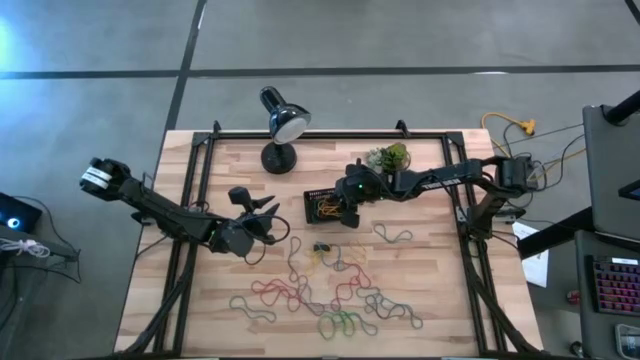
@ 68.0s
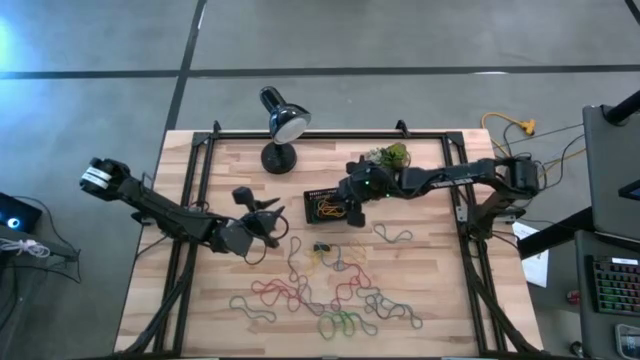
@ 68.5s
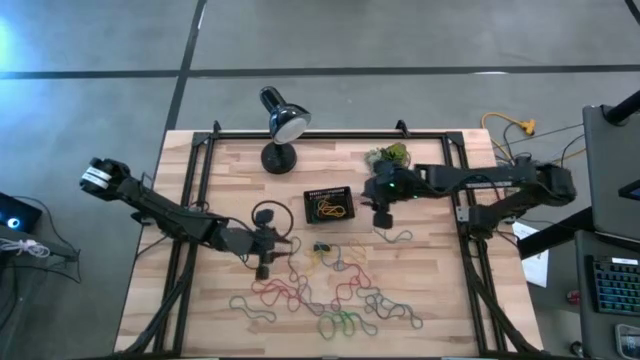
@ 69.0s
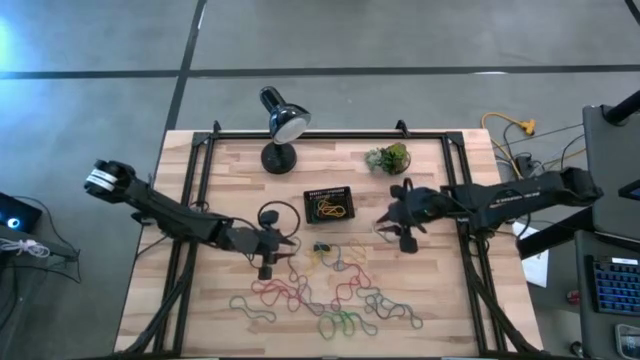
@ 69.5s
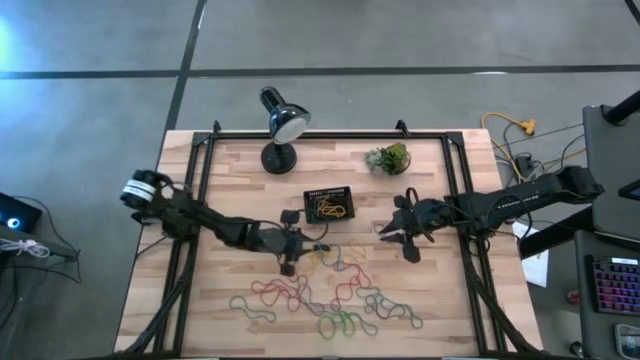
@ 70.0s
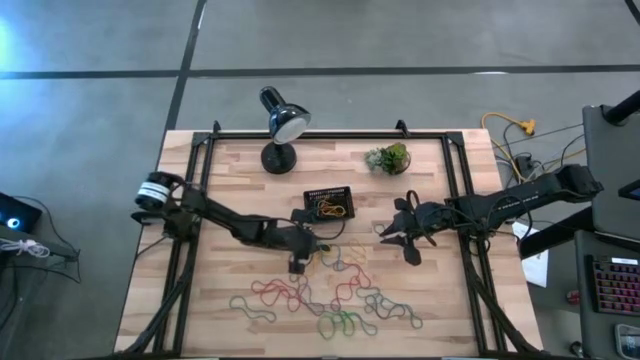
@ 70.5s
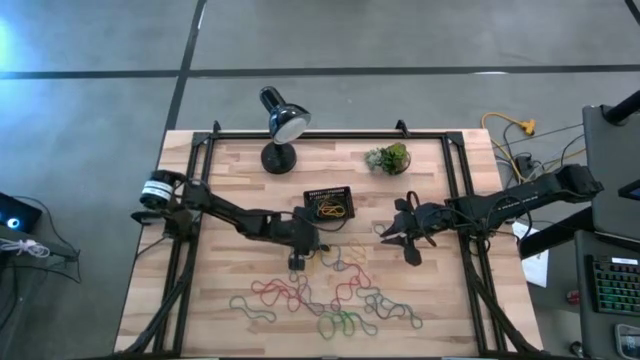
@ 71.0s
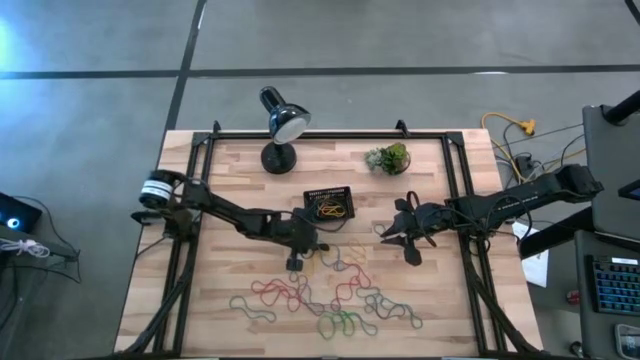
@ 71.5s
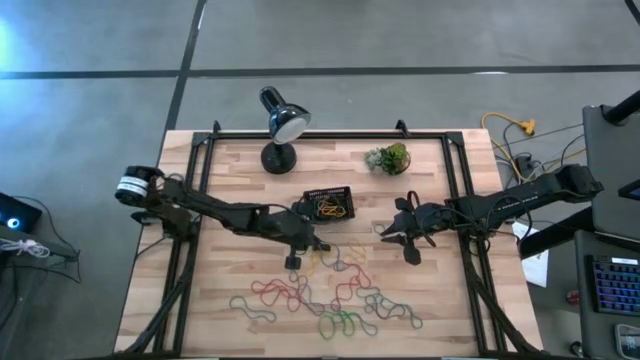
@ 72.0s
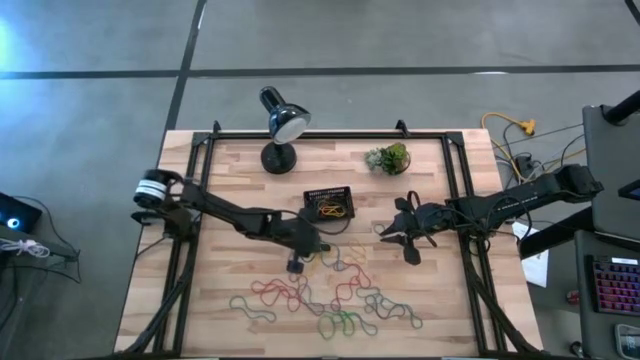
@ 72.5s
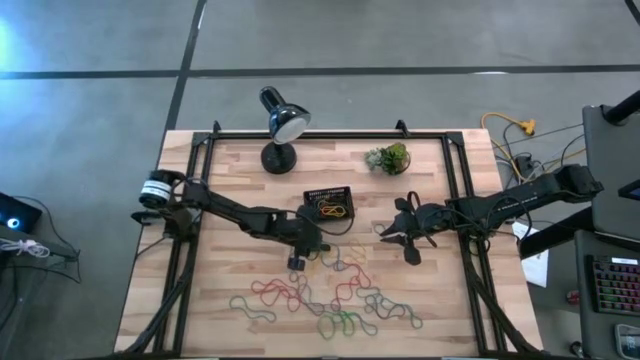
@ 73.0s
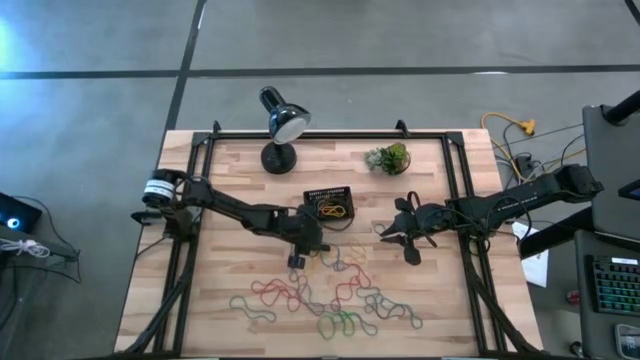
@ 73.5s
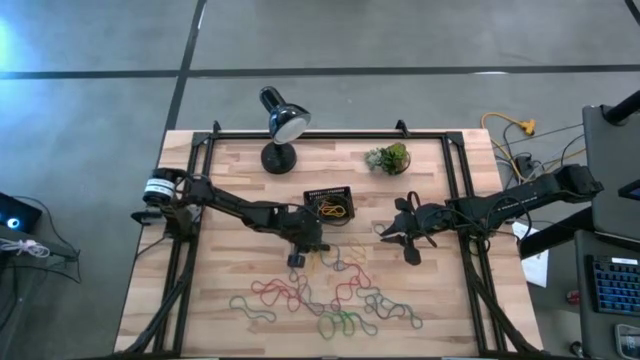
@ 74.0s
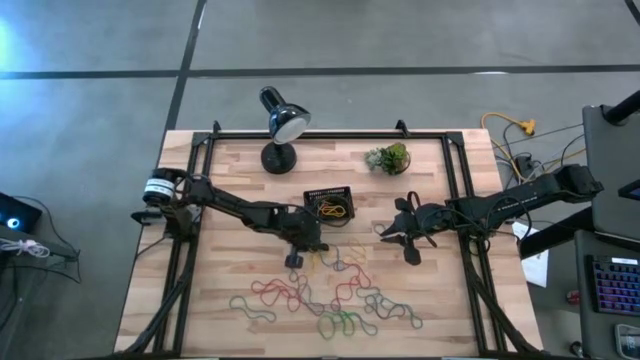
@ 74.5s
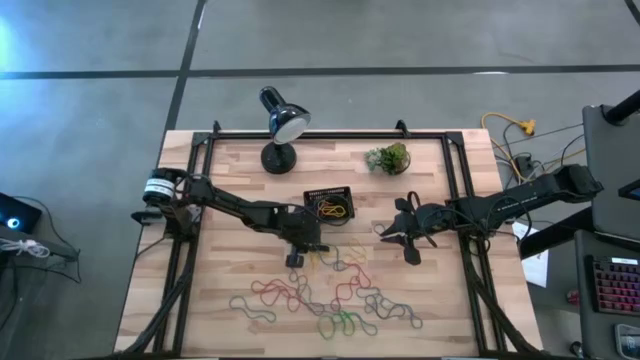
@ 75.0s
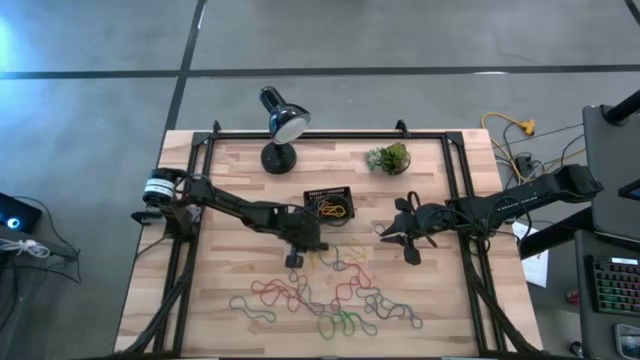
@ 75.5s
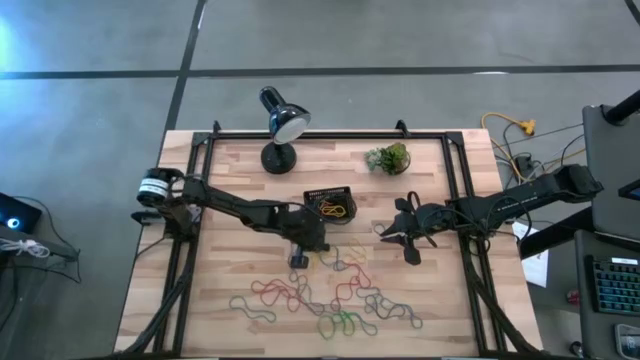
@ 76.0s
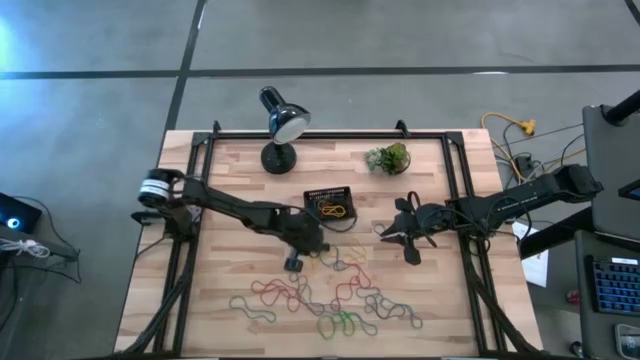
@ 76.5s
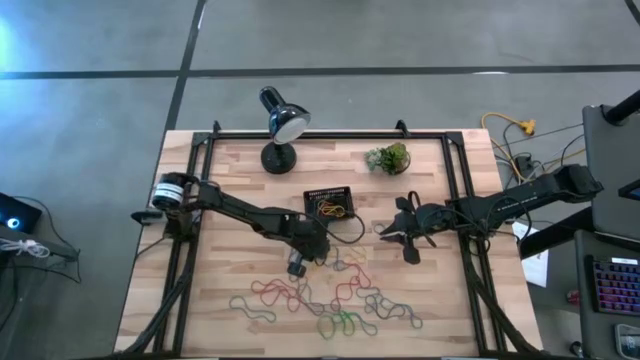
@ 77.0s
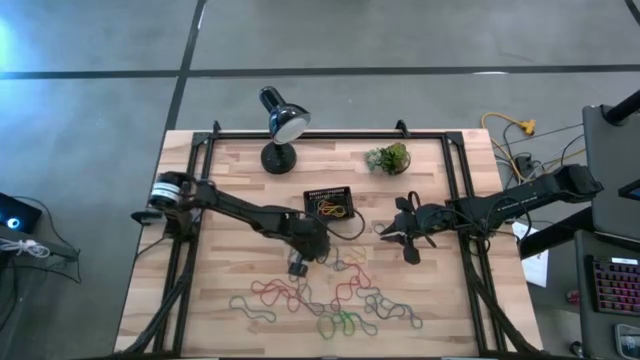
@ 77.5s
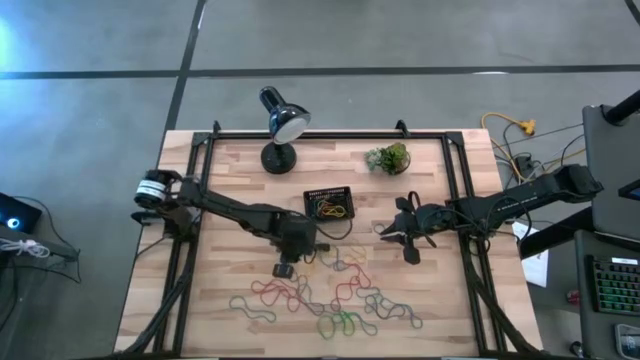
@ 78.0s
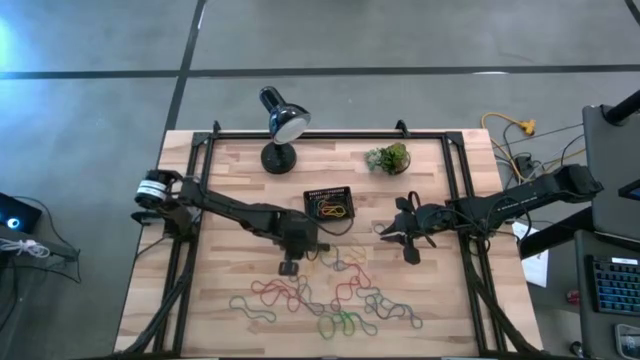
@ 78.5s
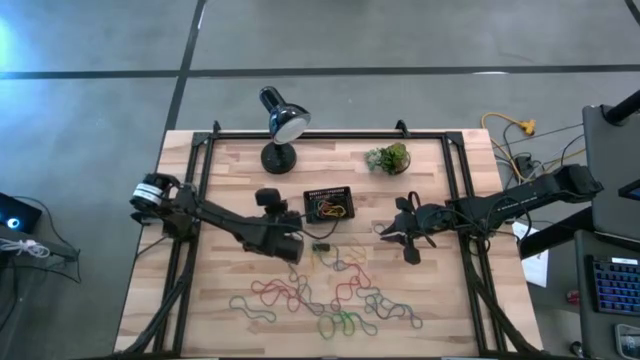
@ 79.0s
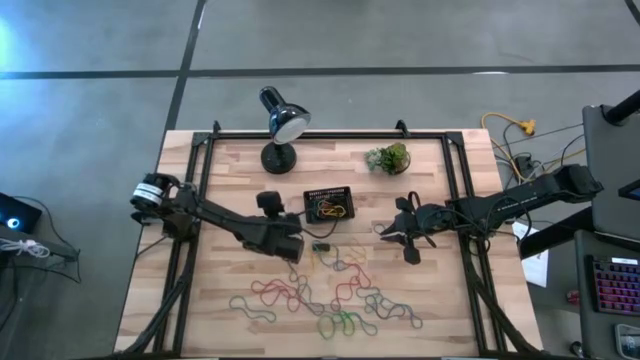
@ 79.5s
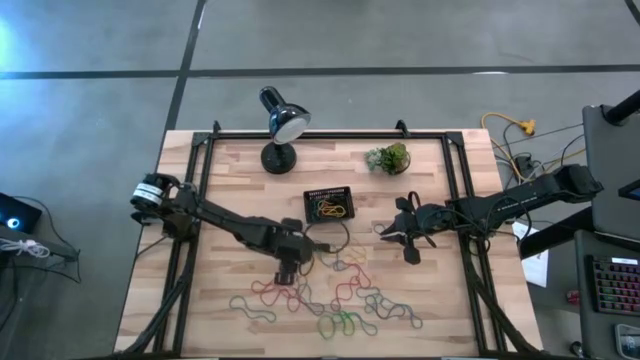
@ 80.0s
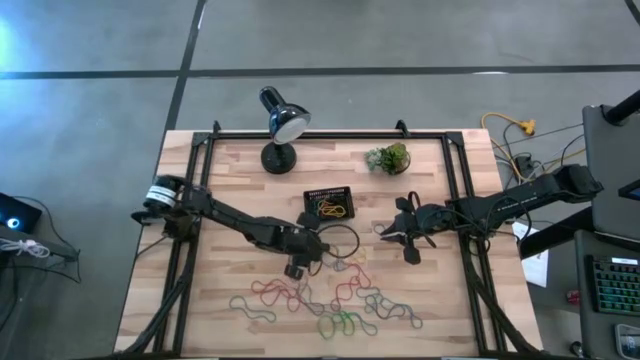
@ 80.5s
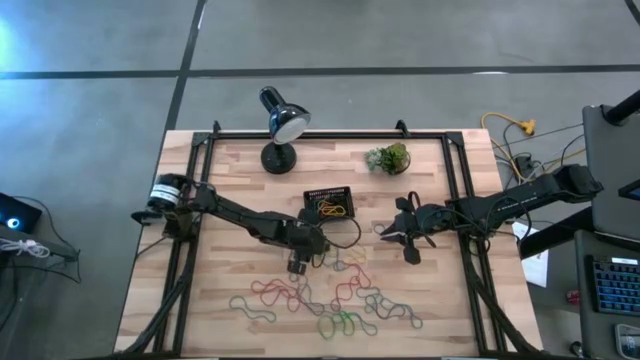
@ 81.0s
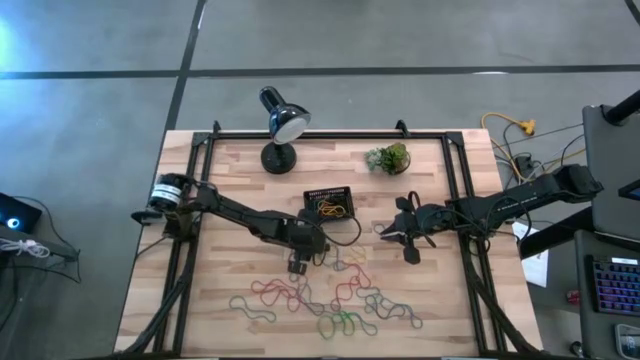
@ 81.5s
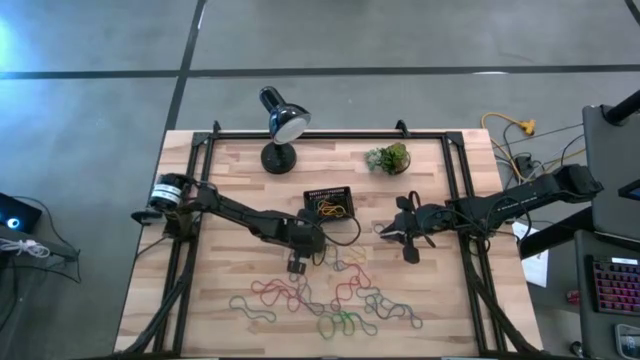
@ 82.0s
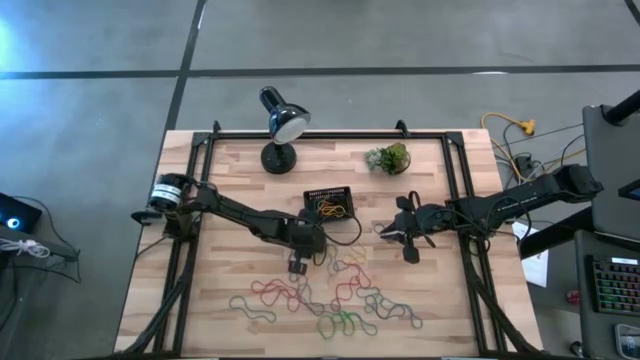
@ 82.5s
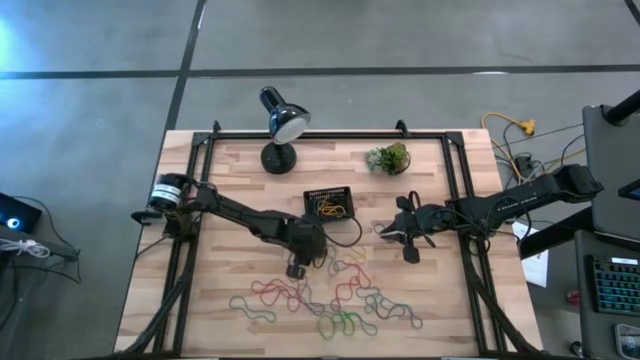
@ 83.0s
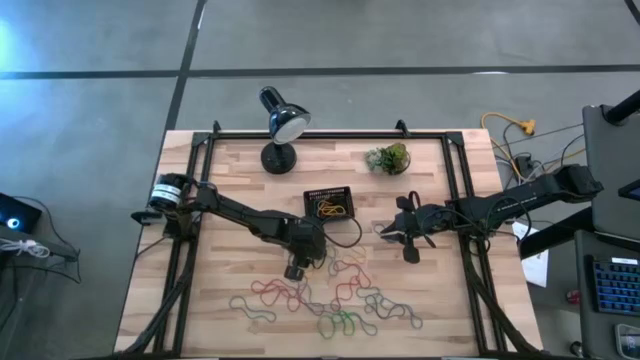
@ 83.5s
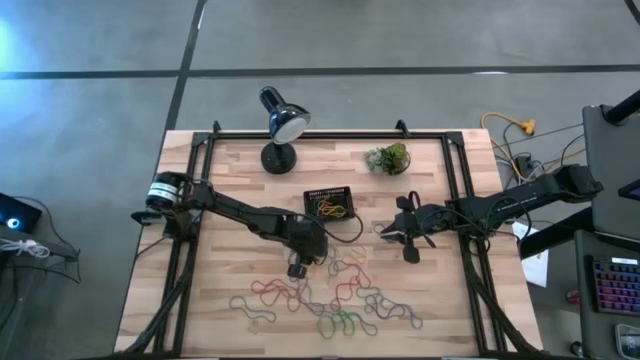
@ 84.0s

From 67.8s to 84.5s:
Task: Pick and place rubber bands into bin
Put the black rubber band into the black bin

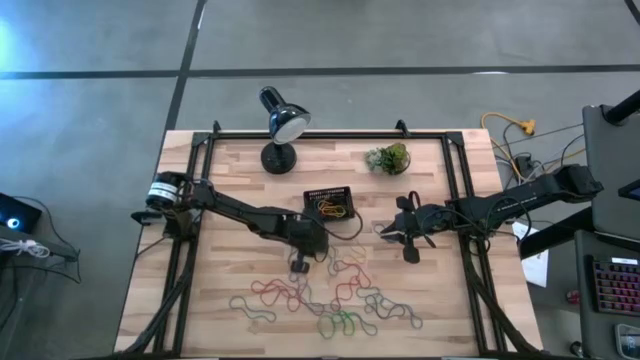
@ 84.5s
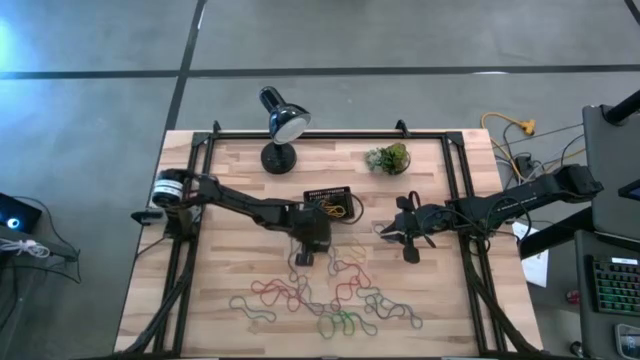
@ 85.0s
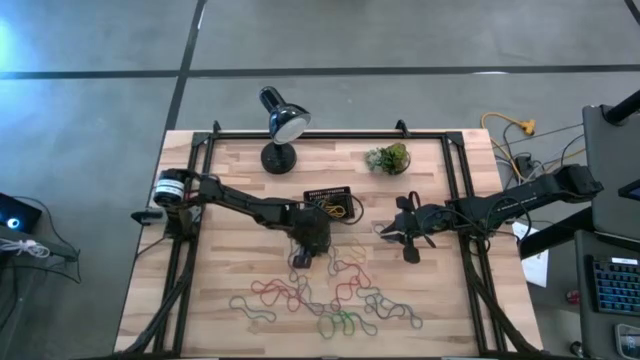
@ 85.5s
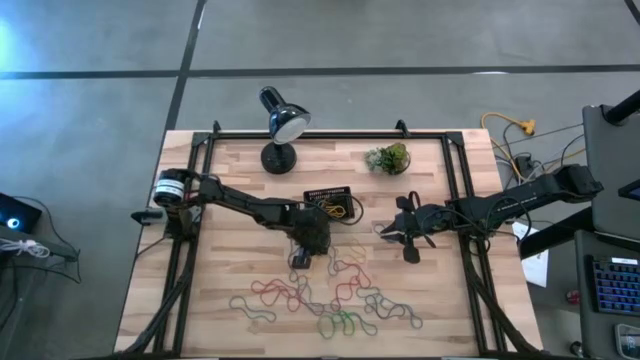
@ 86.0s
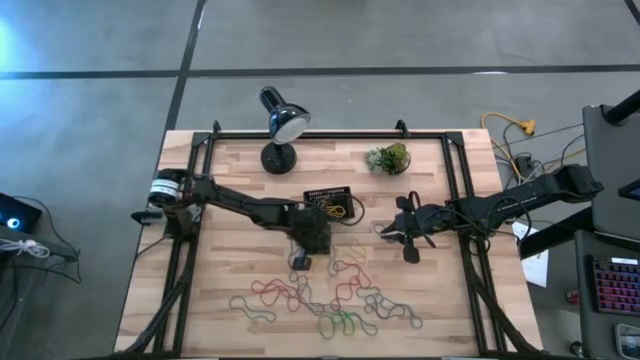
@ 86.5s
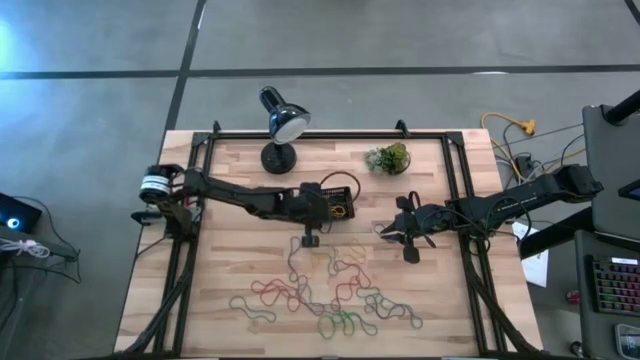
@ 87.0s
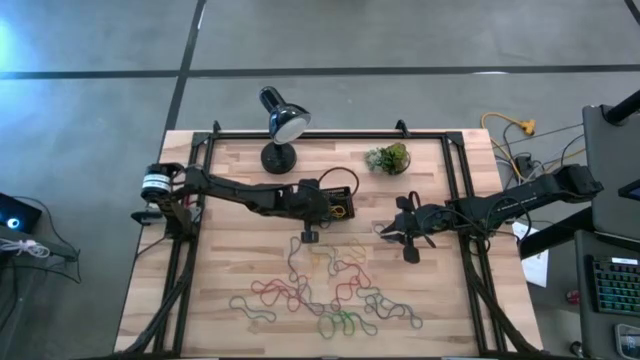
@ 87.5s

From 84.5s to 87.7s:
Put the black rubber band into the black bin

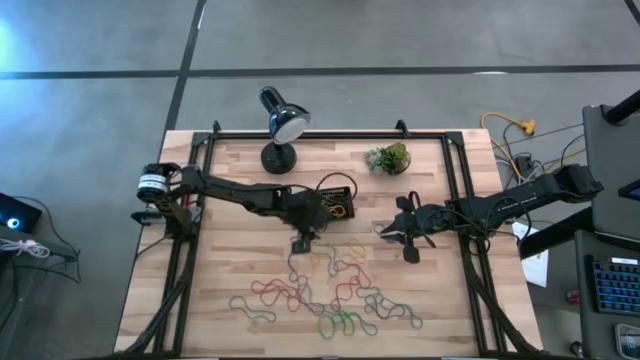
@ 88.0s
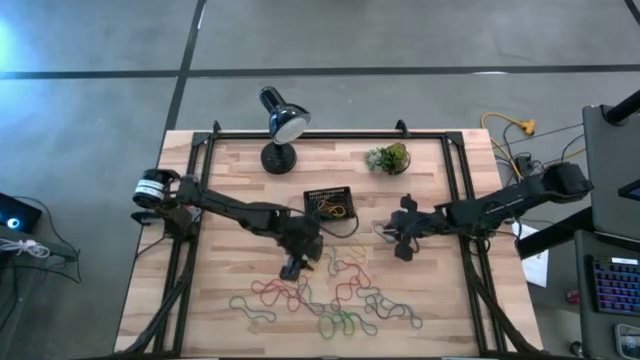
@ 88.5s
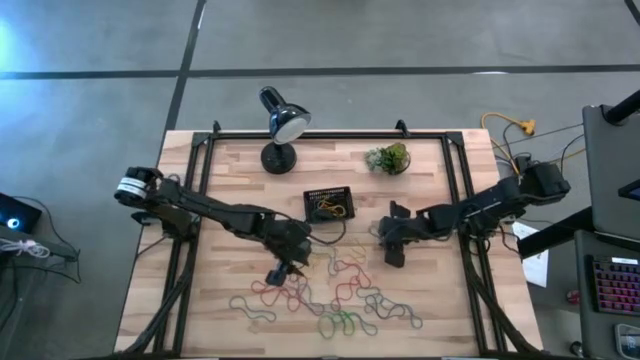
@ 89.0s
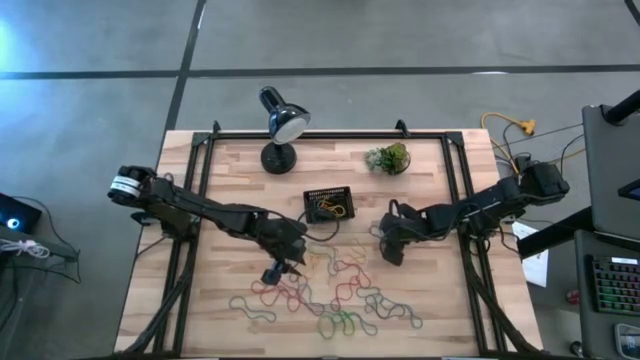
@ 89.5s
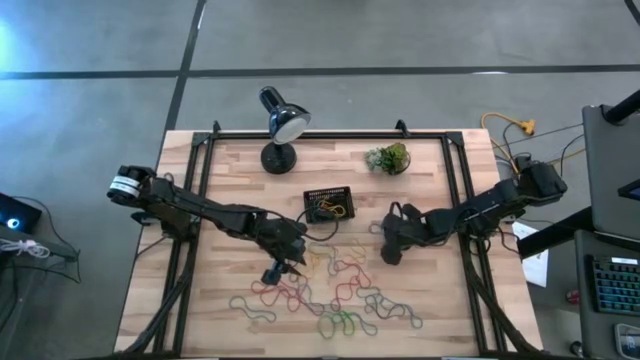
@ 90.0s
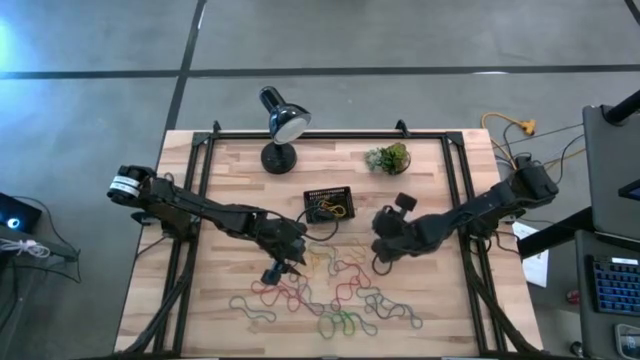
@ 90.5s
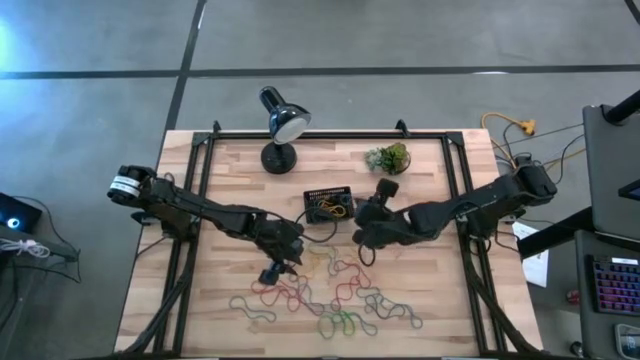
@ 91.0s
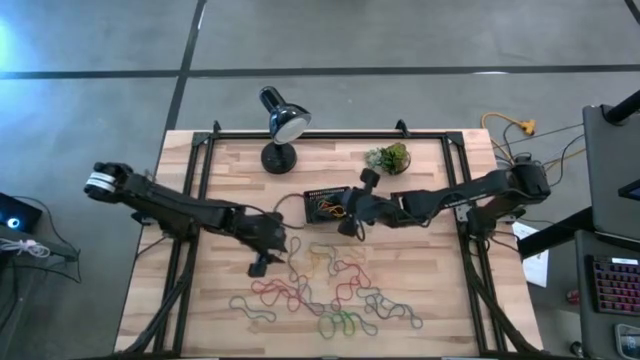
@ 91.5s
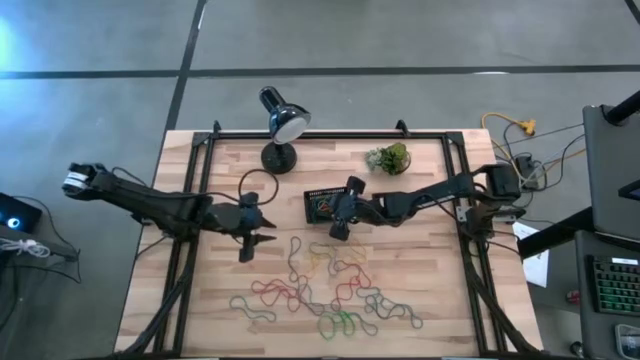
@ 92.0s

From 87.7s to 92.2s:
Put the blue rubber band into the black bin
